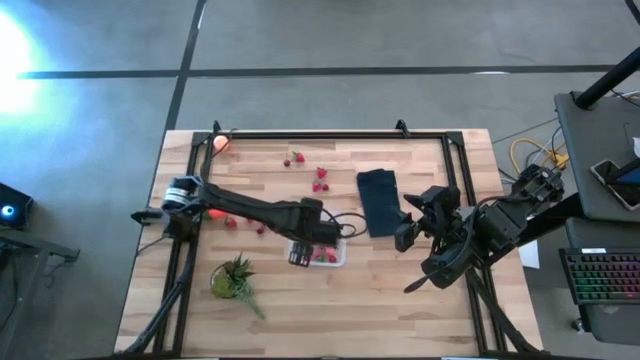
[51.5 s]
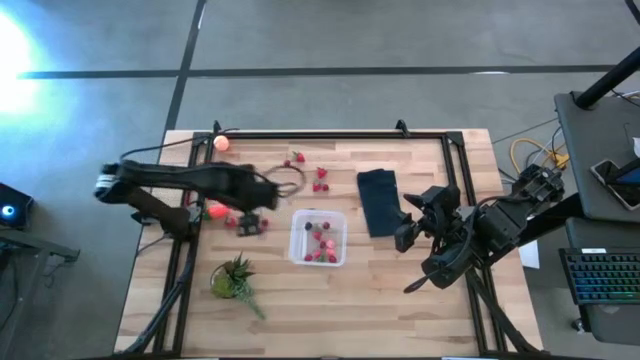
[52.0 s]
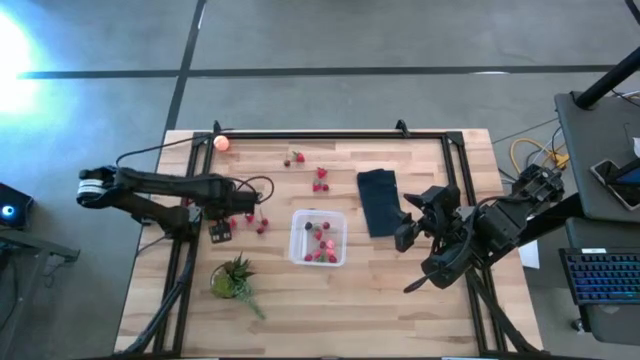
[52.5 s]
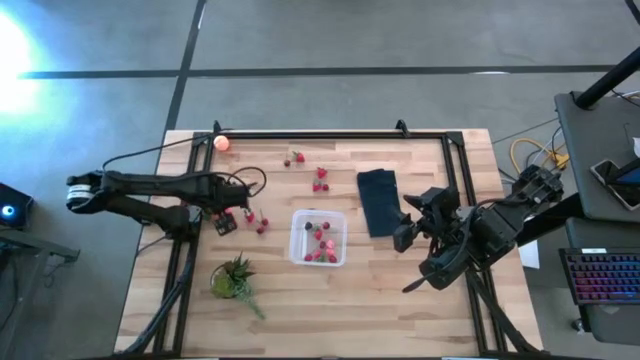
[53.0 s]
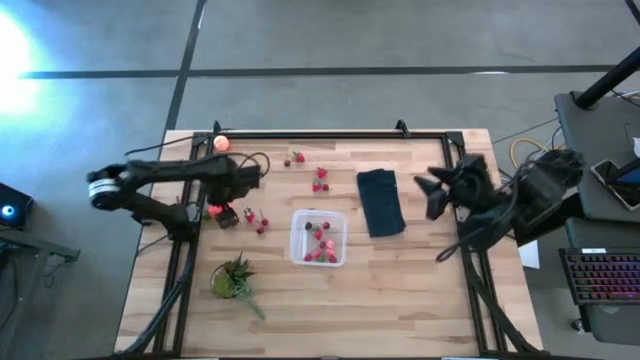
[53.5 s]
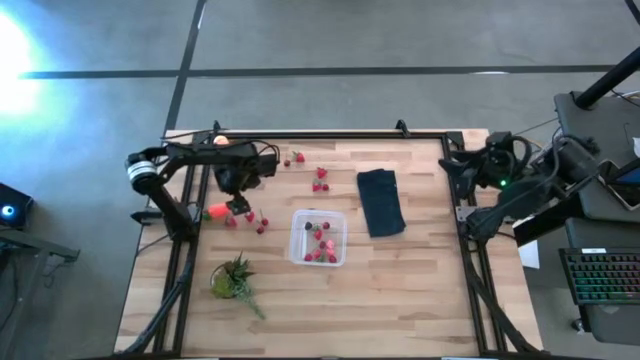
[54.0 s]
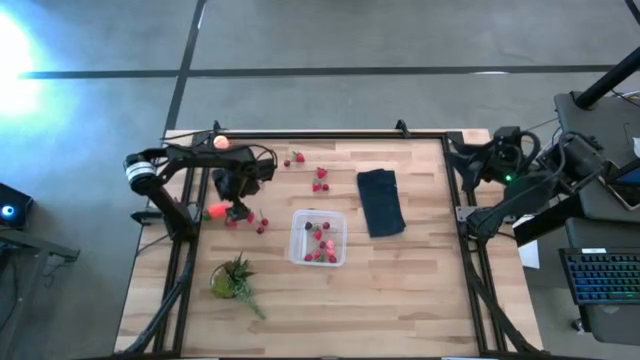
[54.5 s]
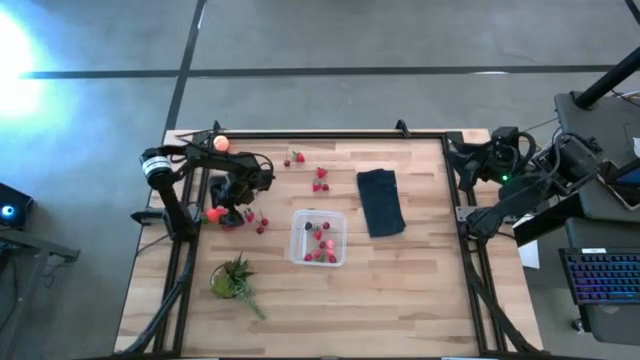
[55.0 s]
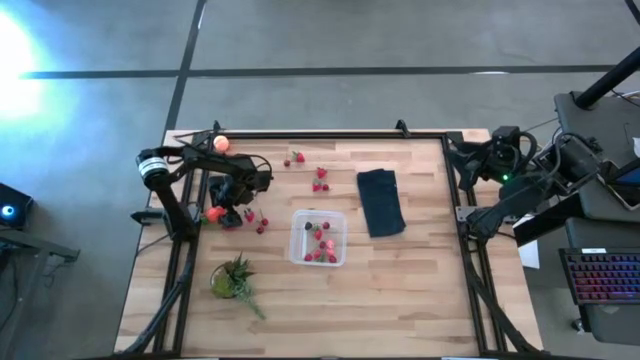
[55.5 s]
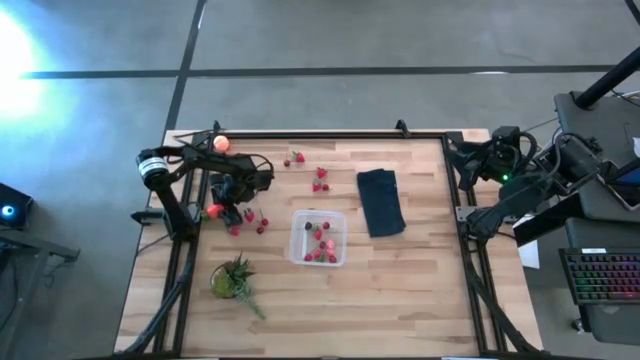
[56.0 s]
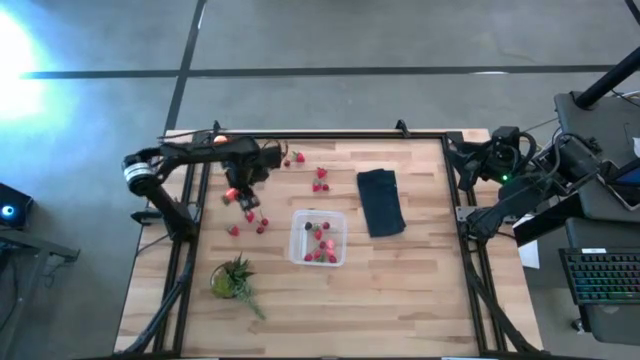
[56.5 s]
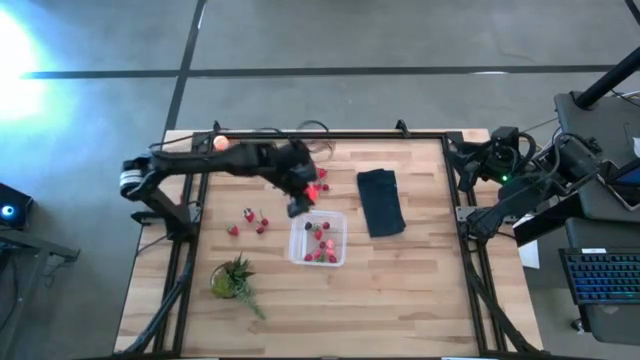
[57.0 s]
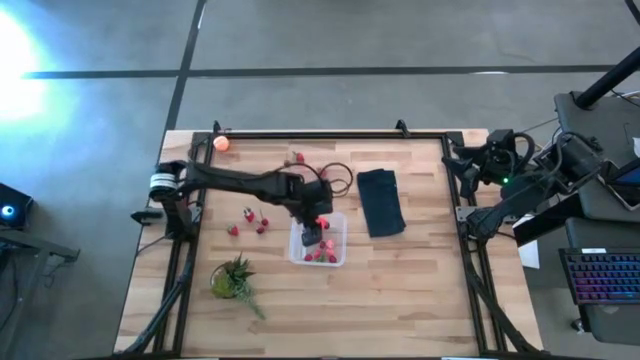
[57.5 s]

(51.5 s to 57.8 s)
Task: Pick and placing Produce into tupperware
Put the orange carrot into the transparent bin

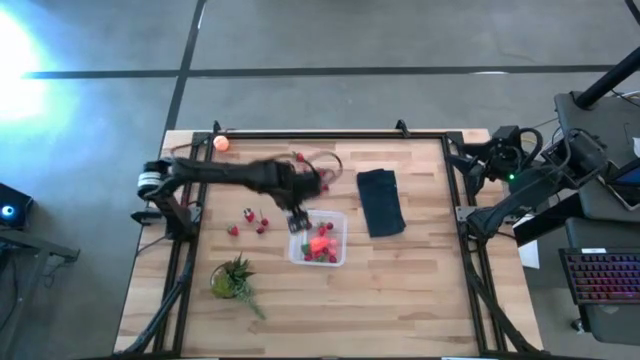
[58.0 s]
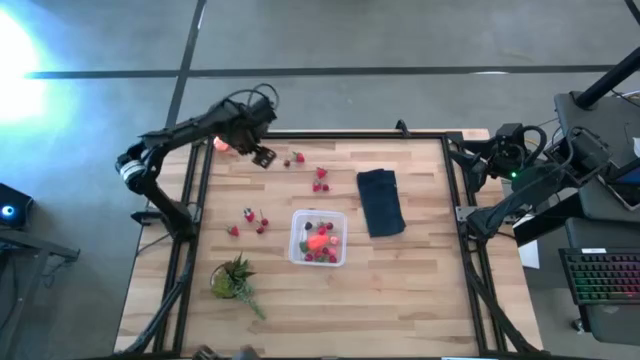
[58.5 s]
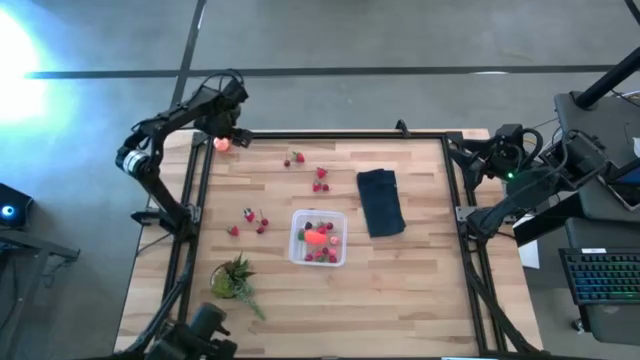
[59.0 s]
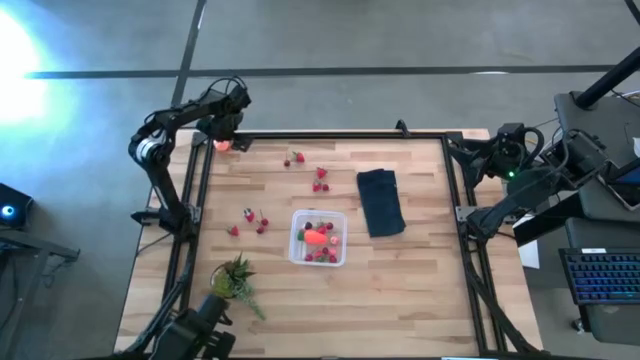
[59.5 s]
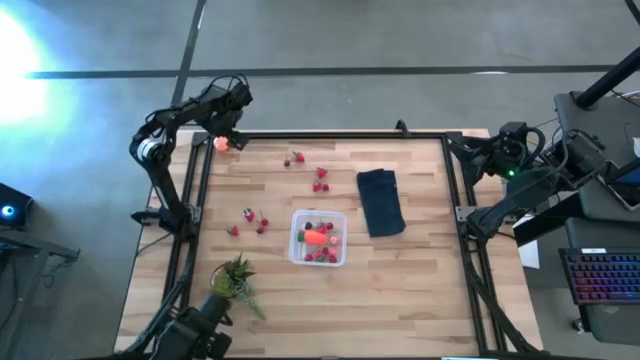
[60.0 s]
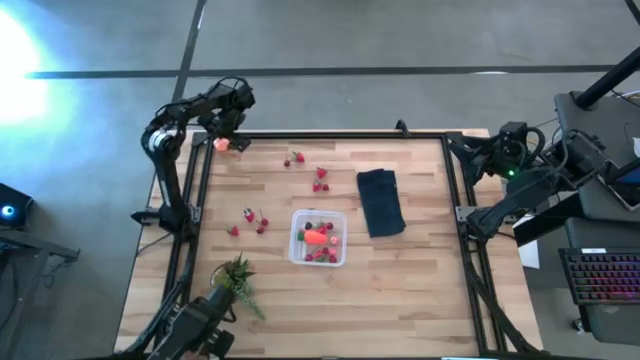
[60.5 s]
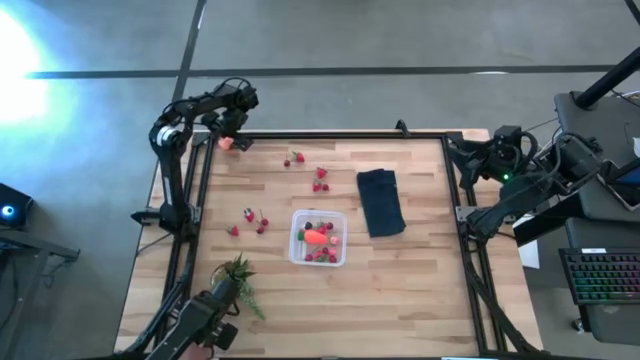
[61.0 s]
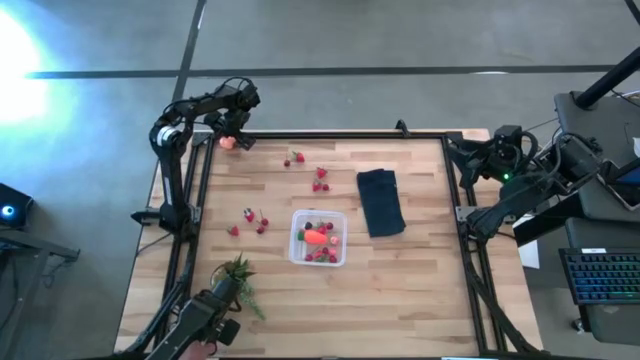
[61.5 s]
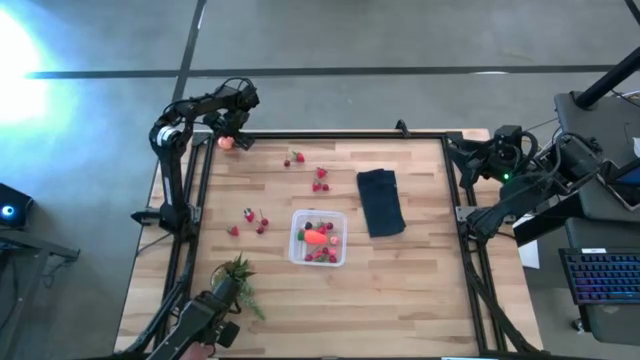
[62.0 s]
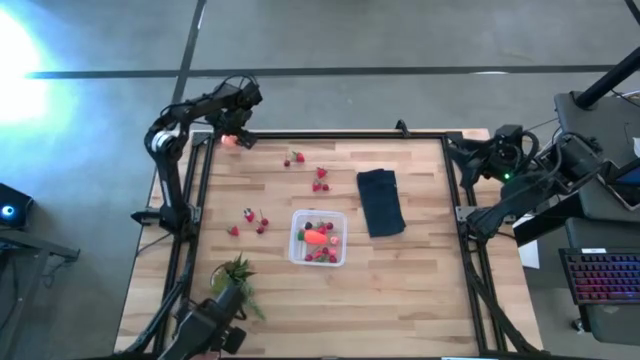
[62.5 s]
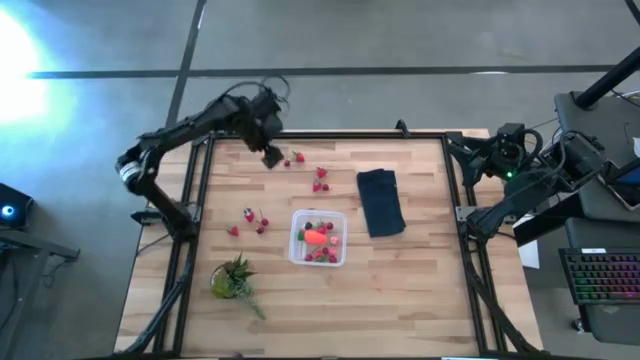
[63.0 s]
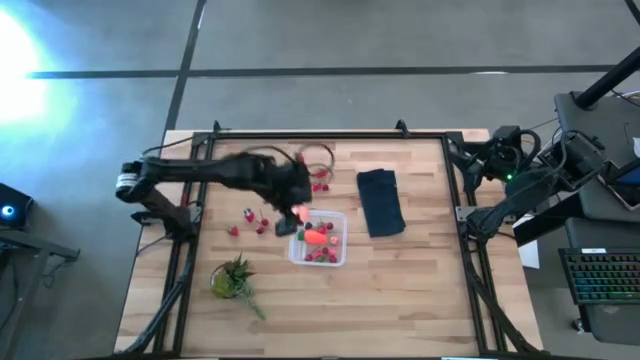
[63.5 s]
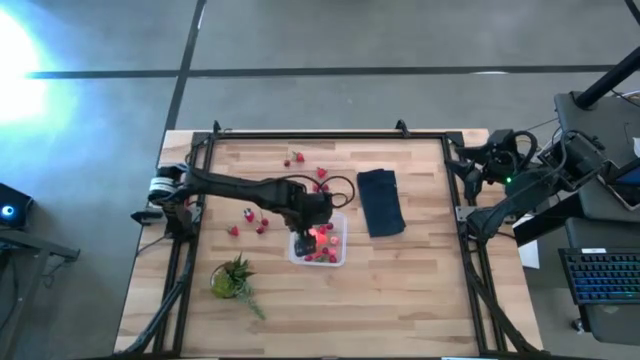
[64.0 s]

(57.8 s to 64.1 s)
Put the pink peach into the transparent bin

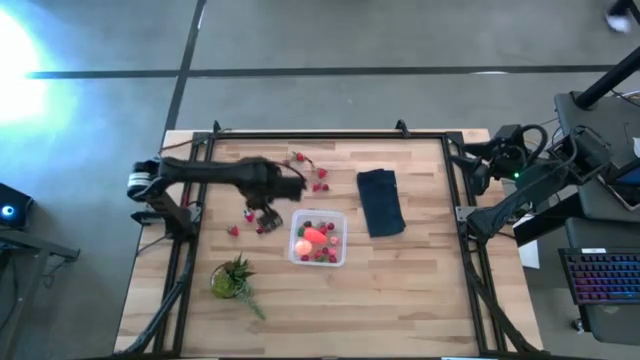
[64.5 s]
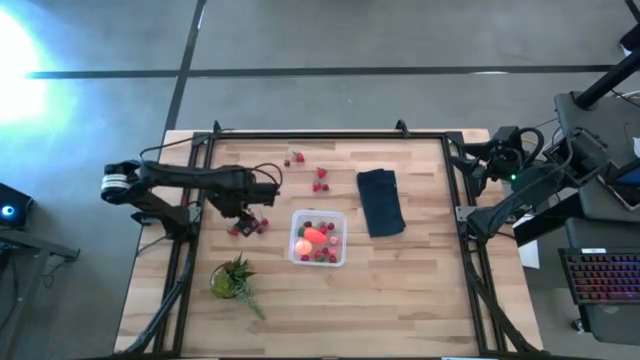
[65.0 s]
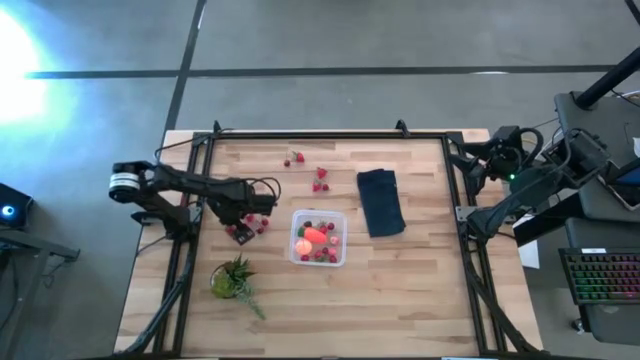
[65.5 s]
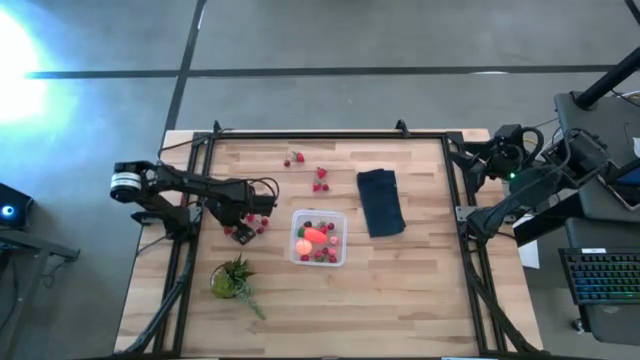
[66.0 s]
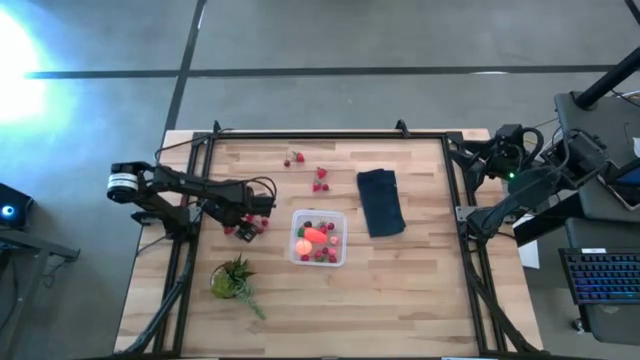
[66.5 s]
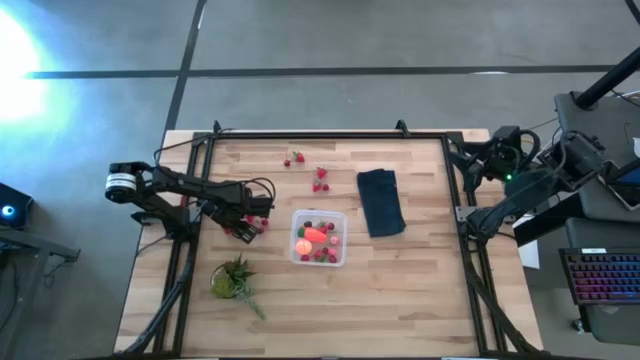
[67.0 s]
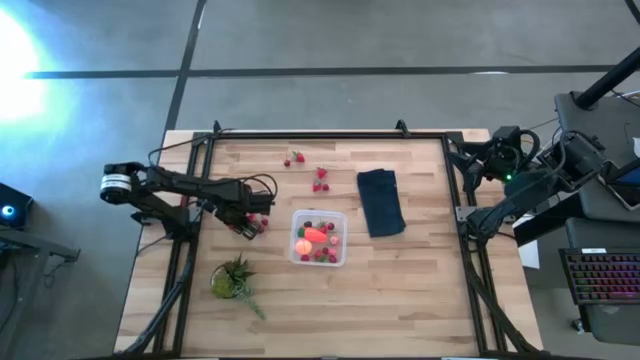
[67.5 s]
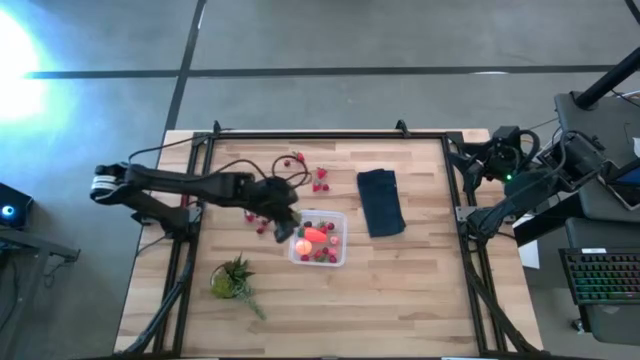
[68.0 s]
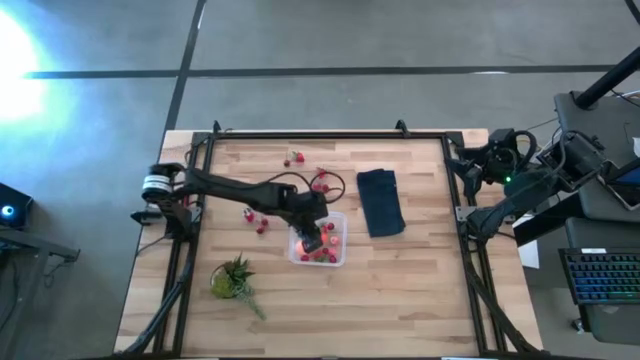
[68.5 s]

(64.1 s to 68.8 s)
Put the red strawberry into the transparent bin

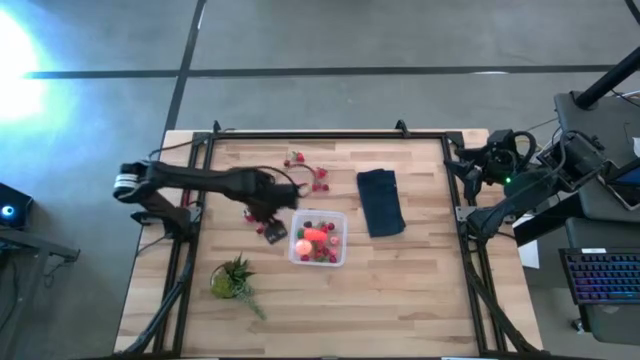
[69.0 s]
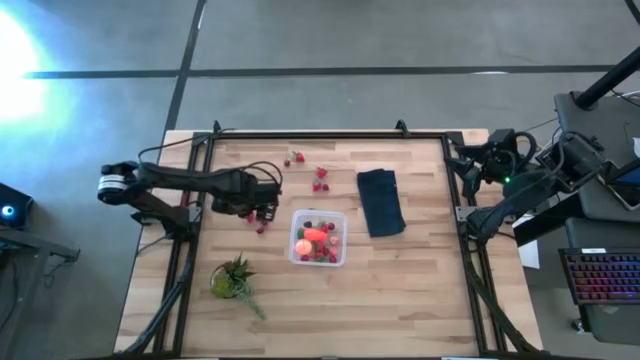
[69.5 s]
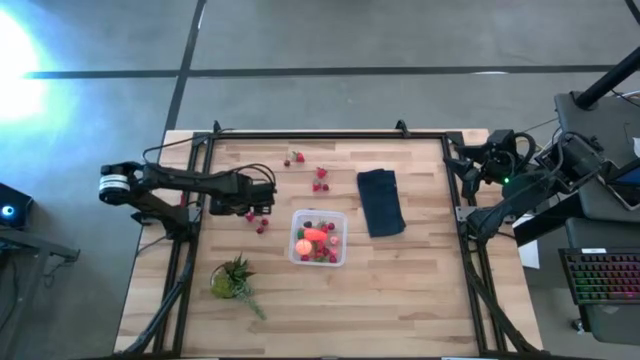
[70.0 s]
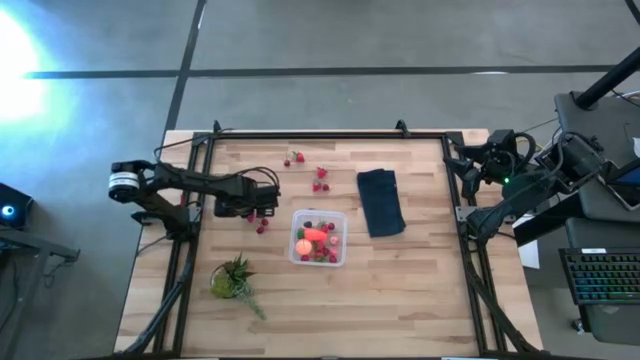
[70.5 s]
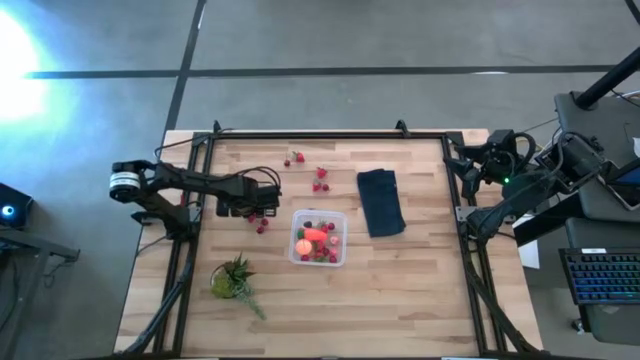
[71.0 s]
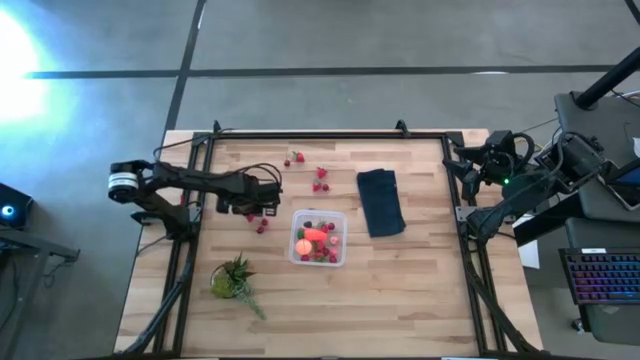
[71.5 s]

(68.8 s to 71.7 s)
Put the red strawberry into the transparent bin

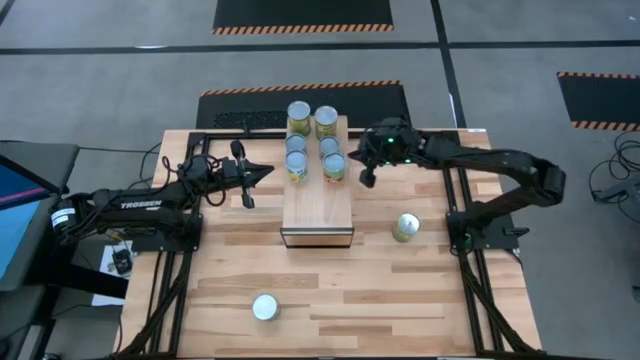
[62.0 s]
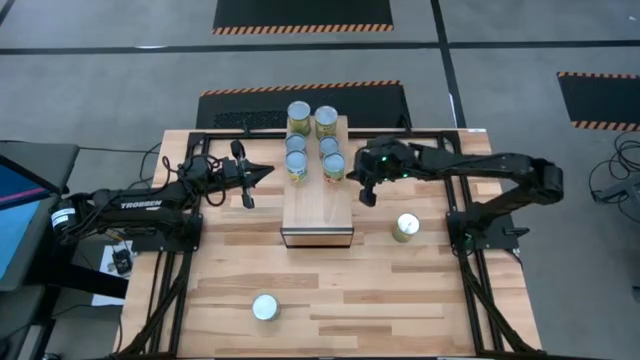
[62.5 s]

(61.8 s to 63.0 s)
Task: Pick and place cans onto a shelf
Adjust the canned spaghetti sauce on the shelf
